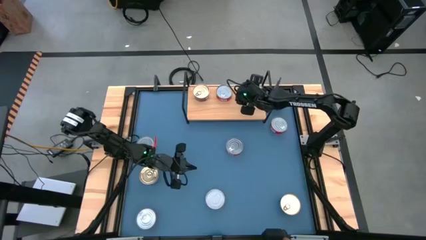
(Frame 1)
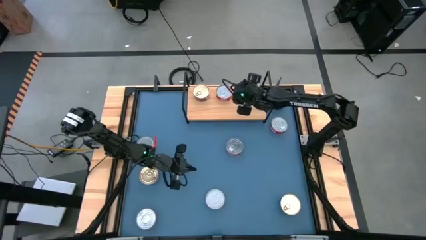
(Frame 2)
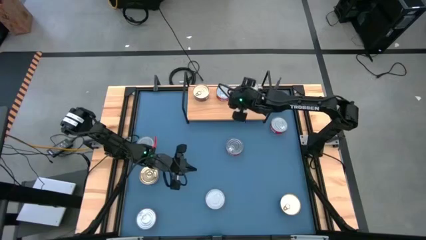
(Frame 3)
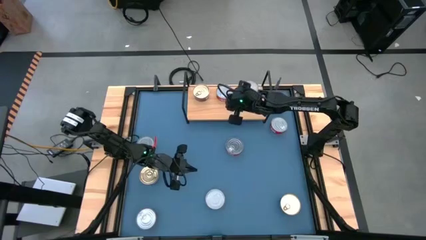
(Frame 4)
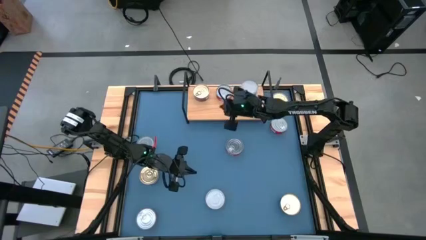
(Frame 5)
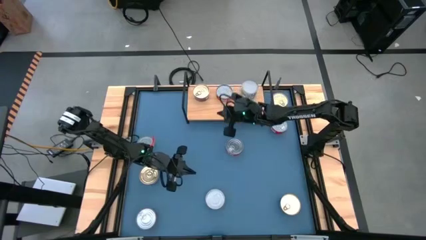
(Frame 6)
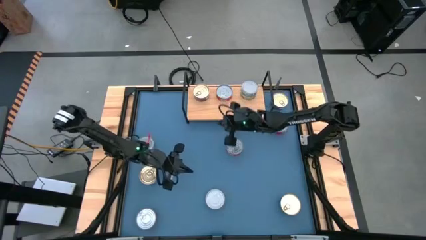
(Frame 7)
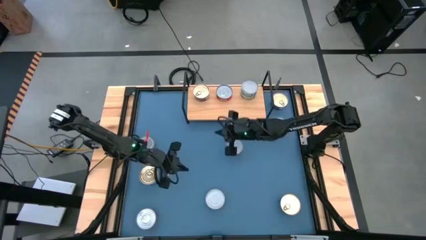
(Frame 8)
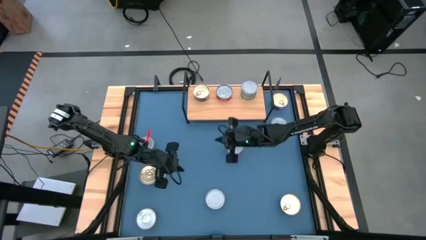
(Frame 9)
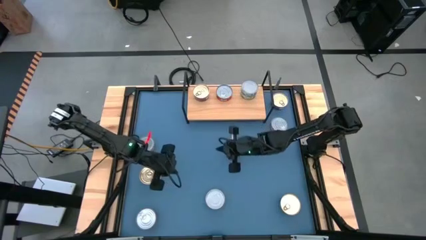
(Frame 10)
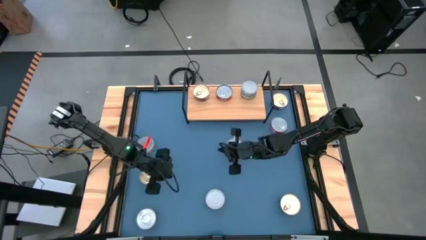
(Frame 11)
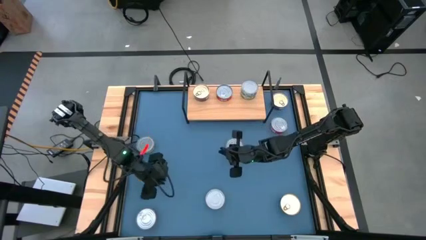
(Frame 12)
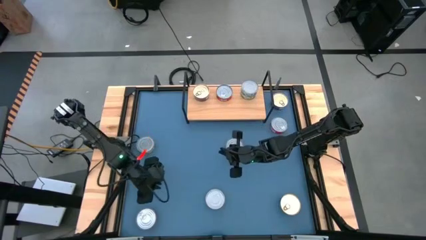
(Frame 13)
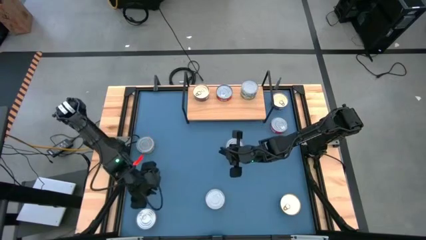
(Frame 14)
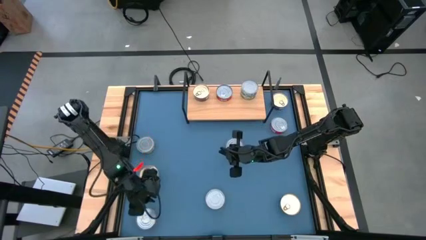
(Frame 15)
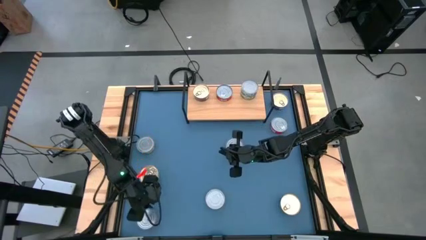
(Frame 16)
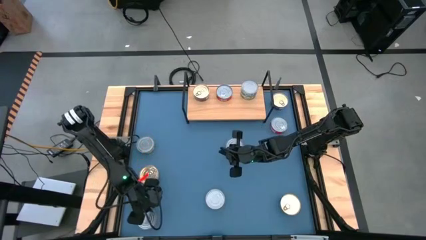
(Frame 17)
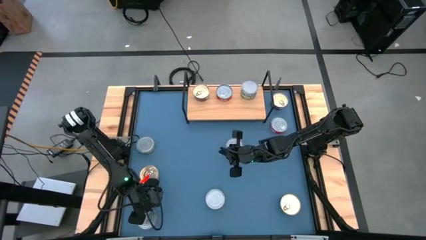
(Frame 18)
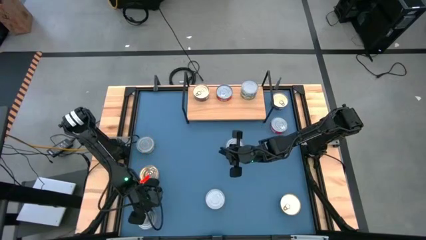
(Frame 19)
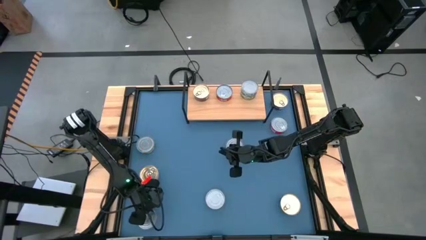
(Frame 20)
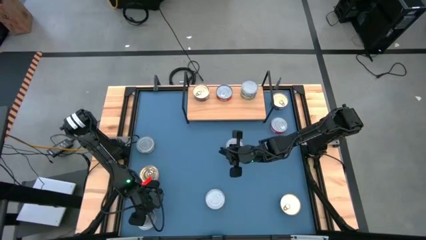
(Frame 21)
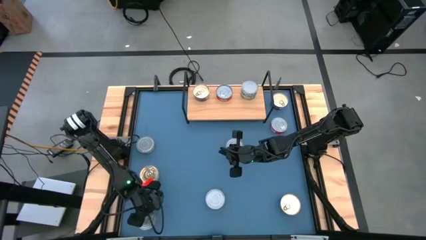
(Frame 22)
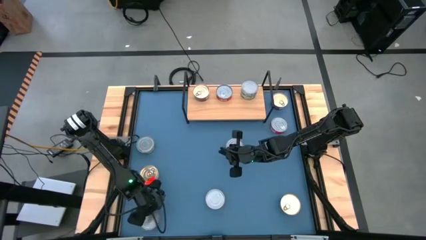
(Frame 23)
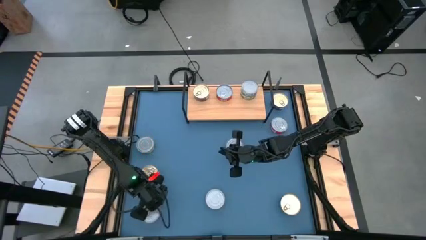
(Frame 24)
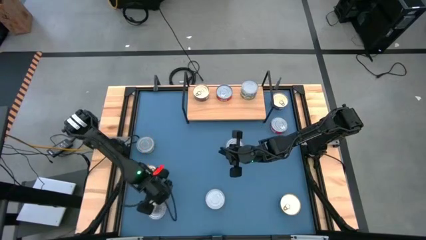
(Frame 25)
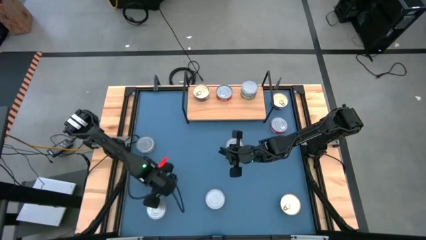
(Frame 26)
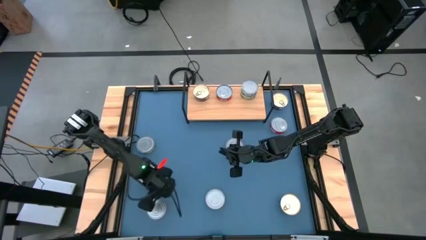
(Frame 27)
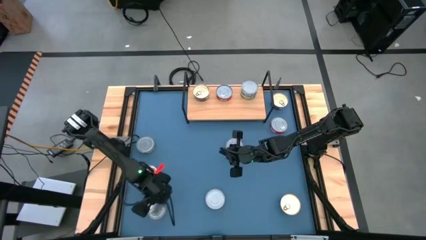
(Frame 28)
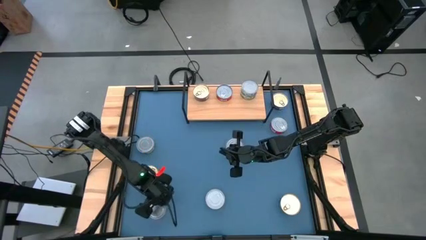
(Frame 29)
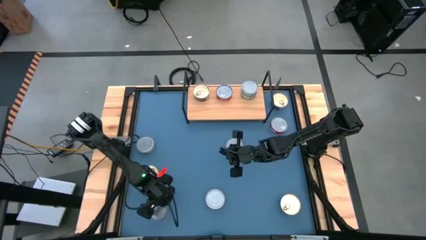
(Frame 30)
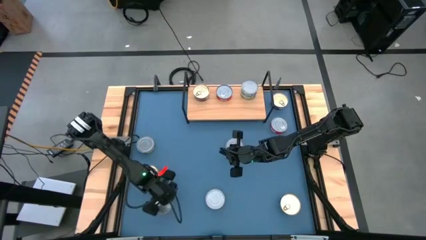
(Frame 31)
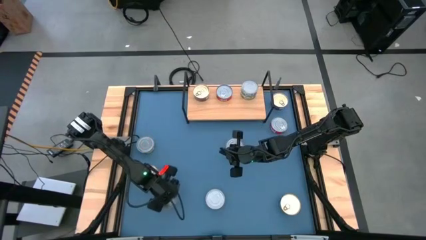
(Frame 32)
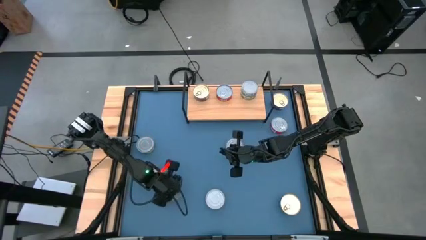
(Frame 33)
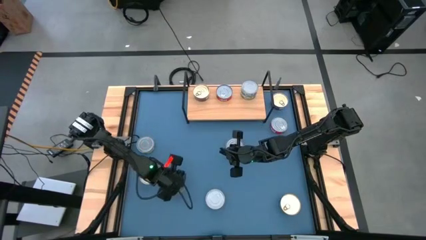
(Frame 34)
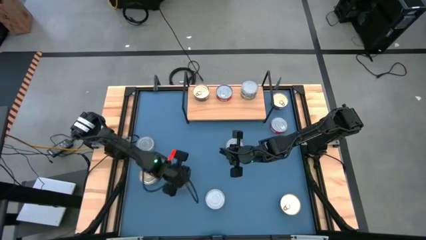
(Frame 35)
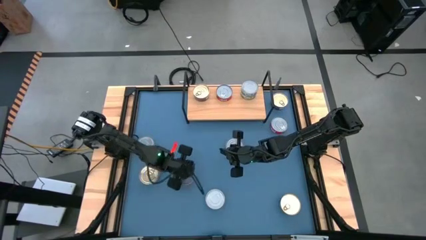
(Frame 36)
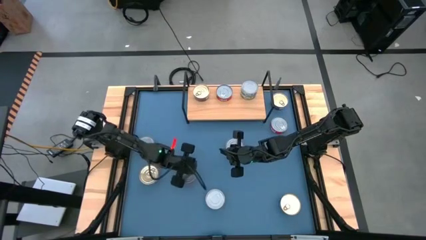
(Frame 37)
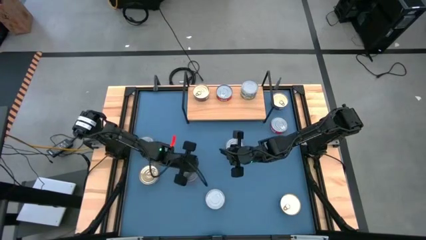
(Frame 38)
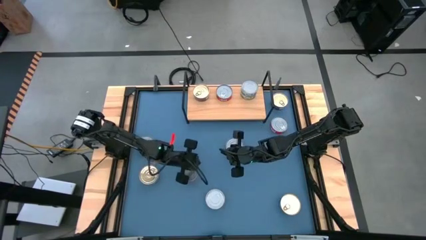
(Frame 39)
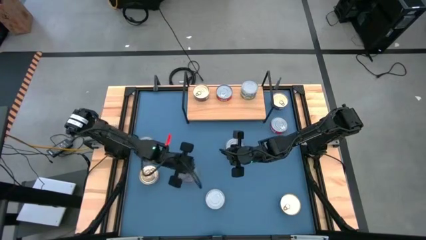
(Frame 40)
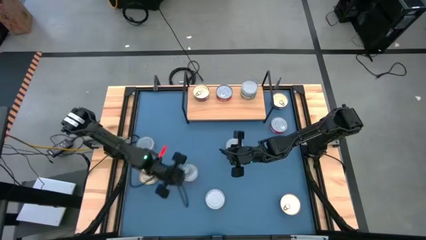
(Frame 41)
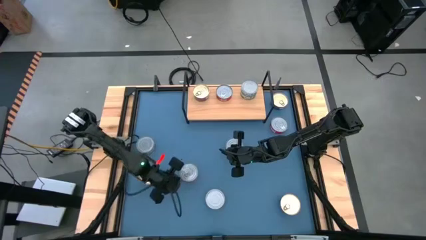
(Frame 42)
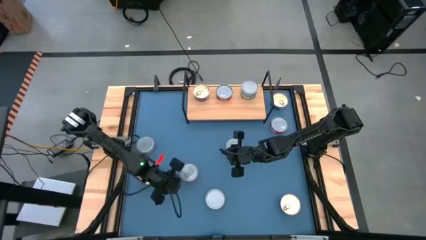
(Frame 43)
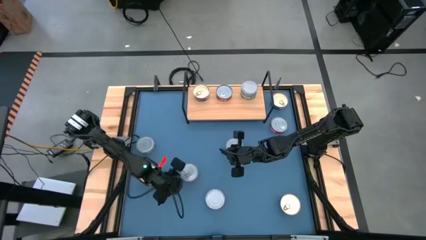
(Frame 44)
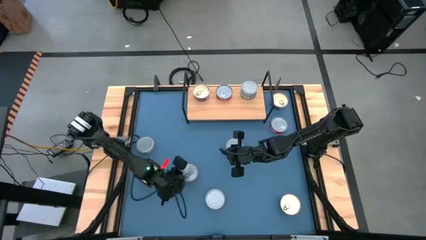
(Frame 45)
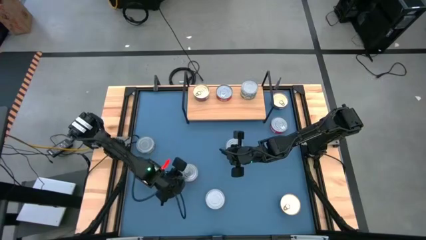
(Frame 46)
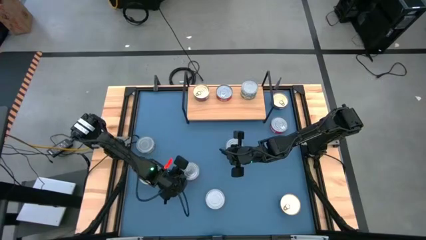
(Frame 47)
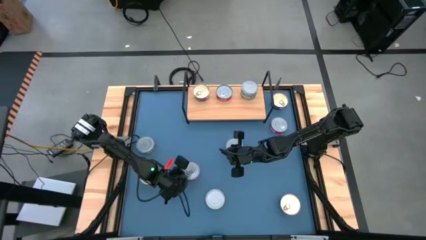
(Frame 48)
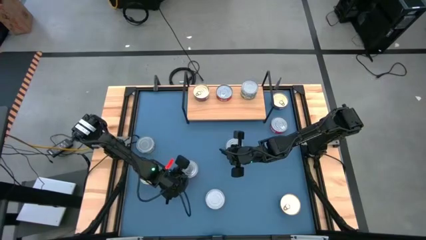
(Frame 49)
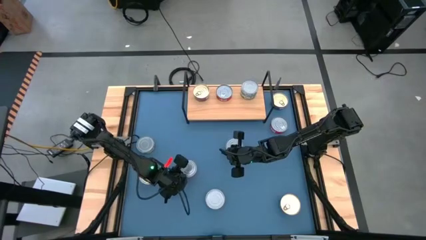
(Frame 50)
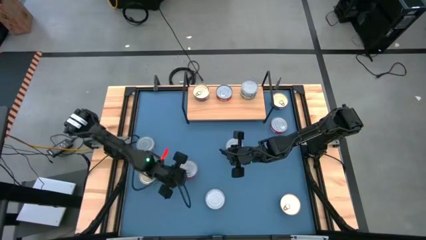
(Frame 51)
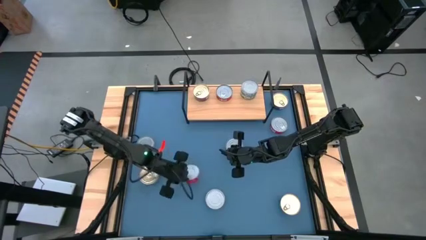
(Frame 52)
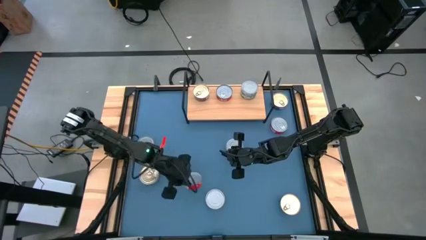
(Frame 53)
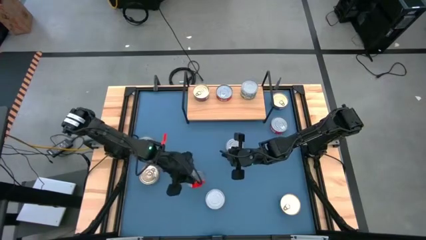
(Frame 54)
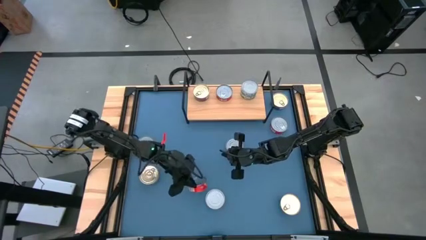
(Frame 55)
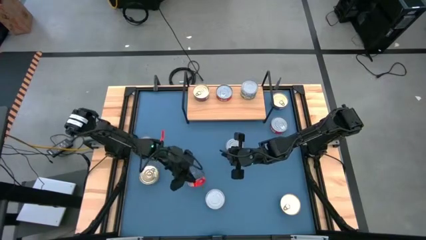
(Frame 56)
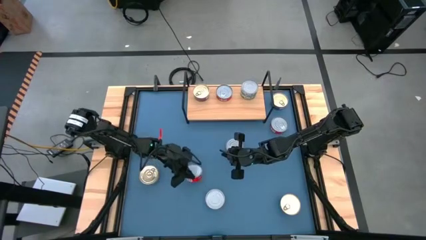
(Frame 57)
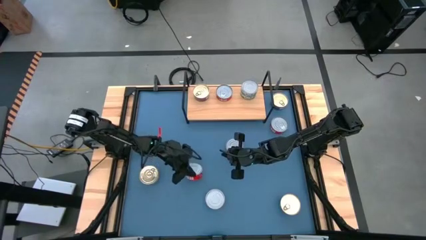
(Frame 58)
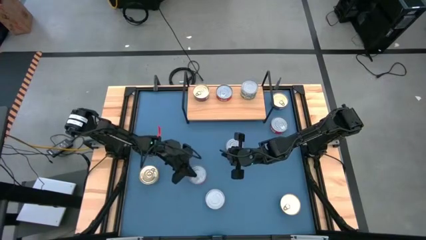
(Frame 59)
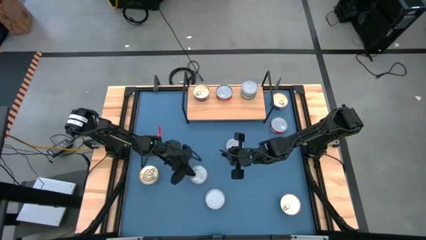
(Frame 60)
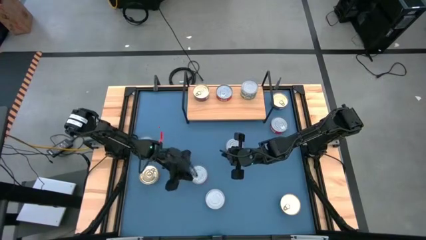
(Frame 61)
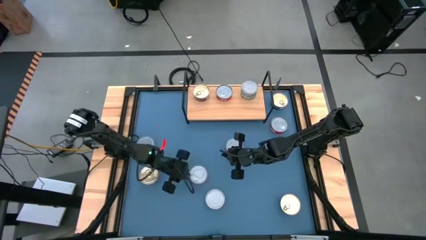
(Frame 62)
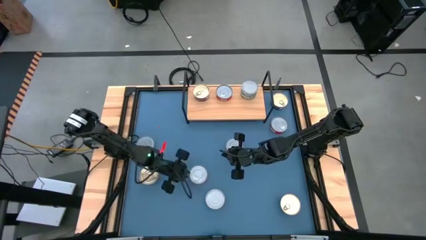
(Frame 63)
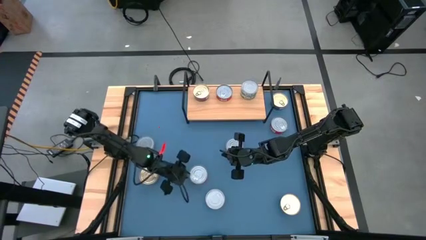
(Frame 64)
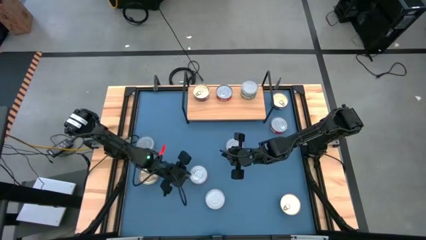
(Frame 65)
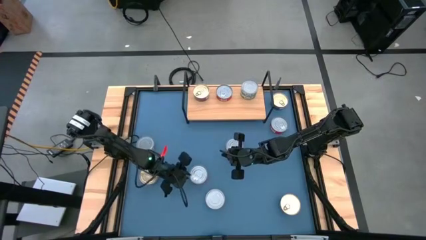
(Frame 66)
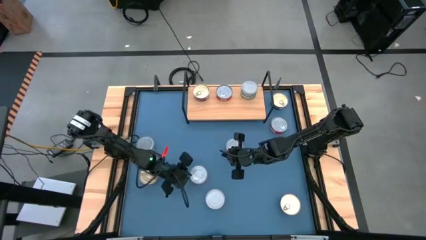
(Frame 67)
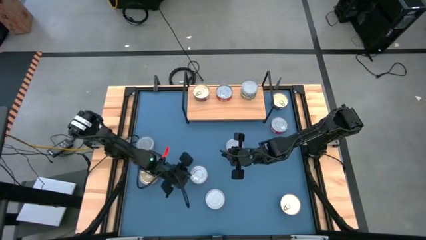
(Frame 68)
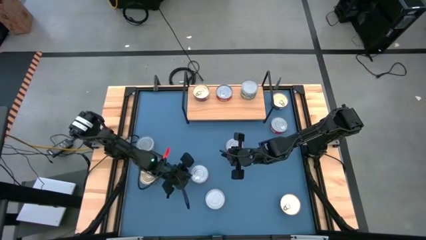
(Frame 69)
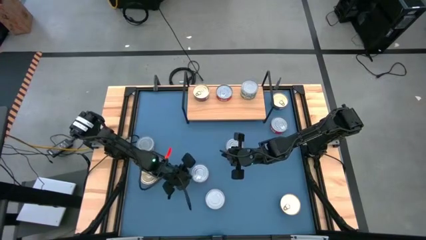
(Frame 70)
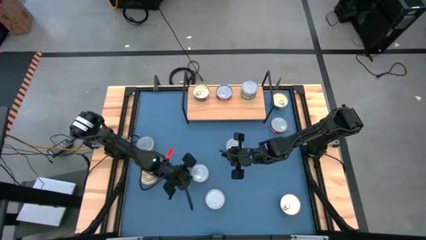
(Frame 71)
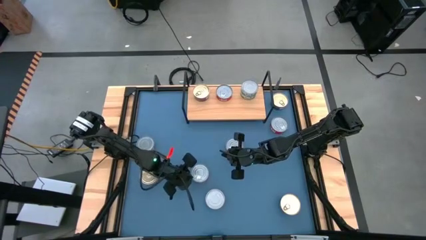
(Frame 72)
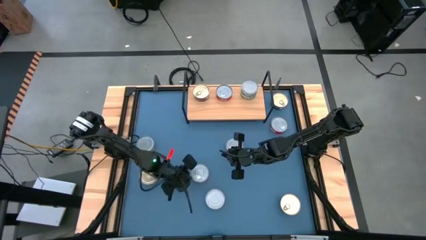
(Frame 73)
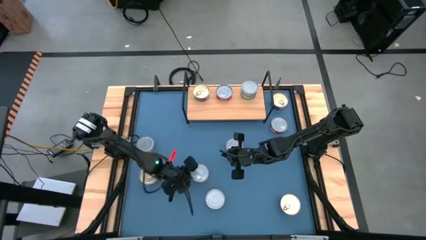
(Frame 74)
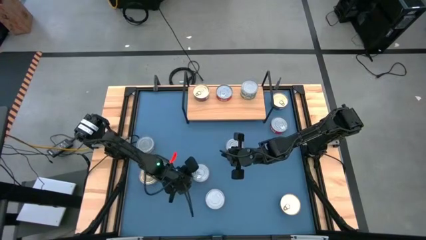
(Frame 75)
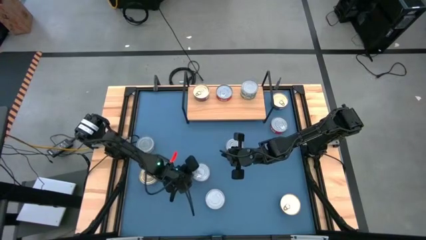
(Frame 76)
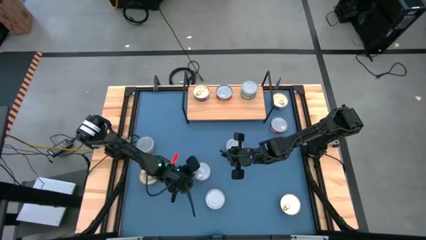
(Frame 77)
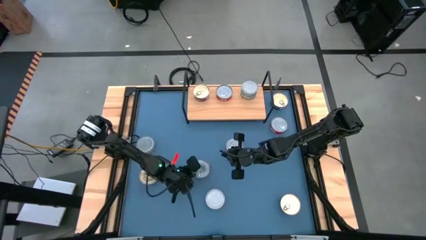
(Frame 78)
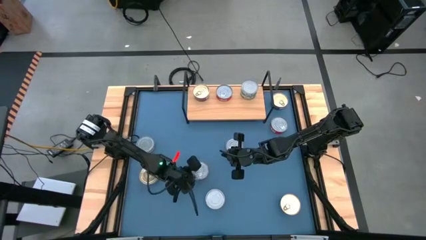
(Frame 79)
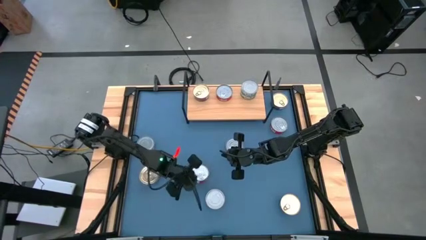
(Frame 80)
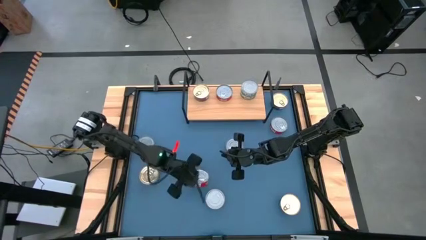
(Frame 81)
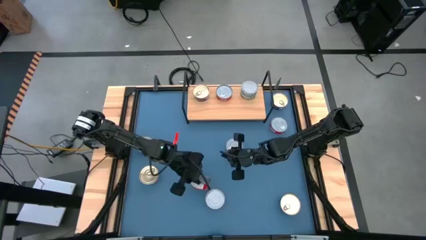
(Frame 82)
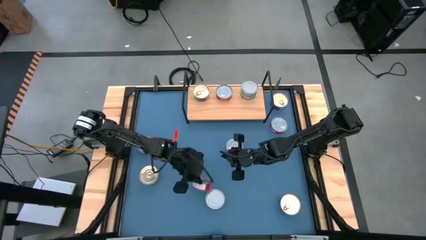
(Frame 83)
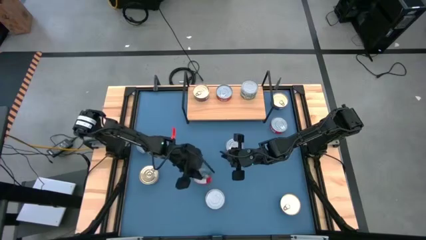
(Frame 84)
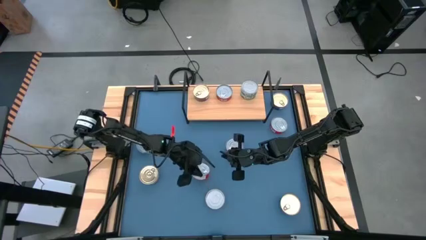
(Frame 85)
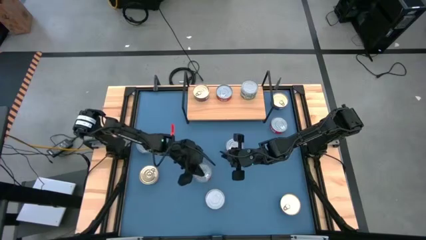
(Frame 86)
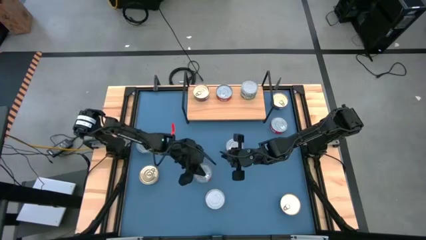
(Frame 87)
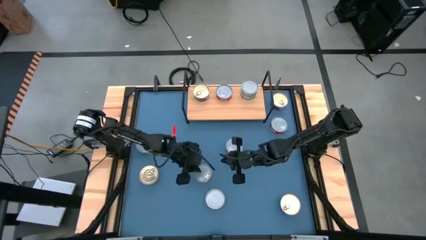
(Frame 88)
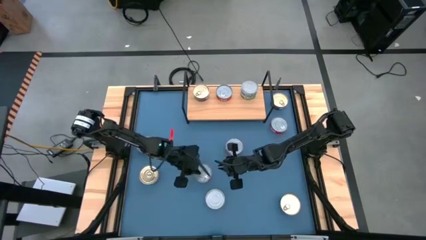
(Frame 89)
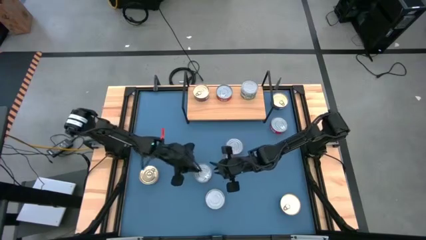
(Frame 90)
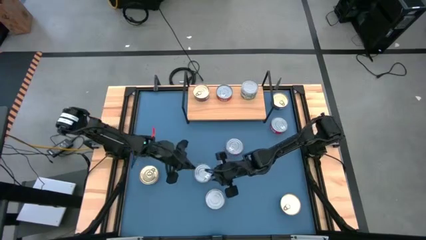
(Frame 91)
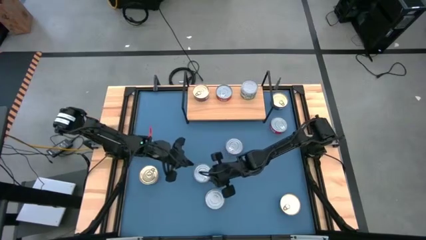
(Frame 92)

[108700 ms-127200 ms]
Task: Stack canned seafood by type on shelf
Stack the red tuna can on top of the other red tuna can on the shelf
